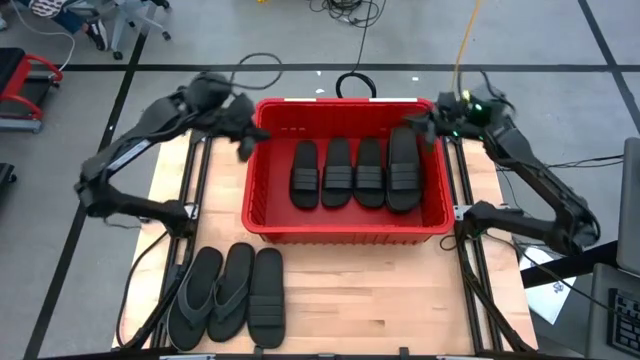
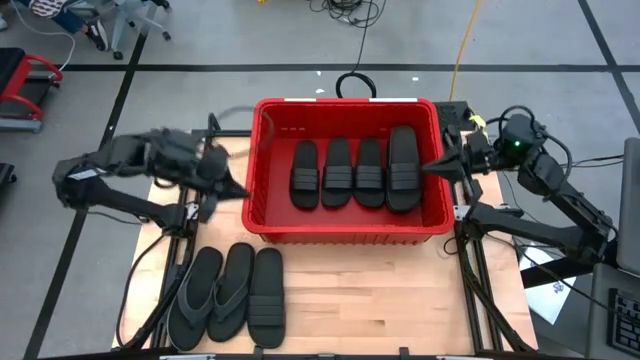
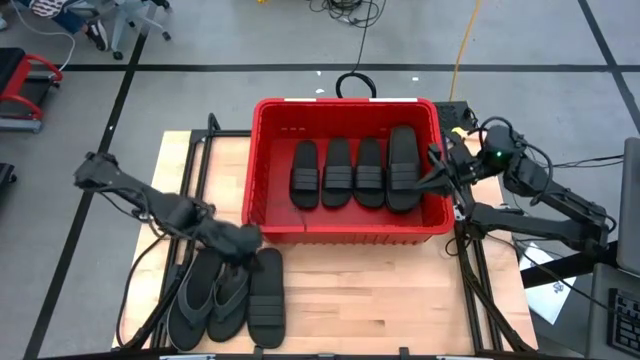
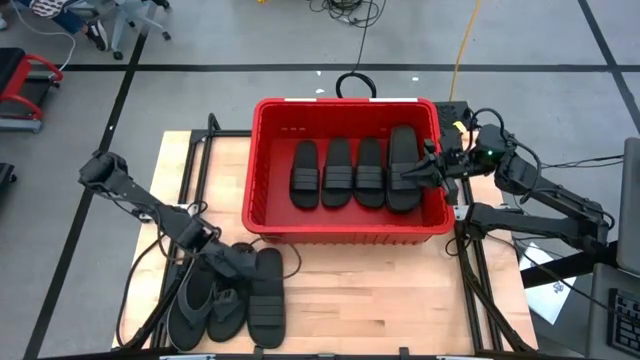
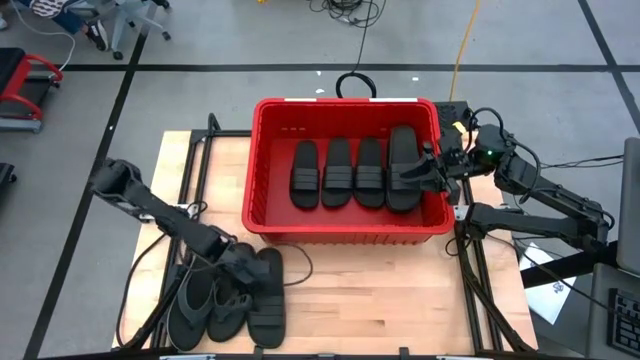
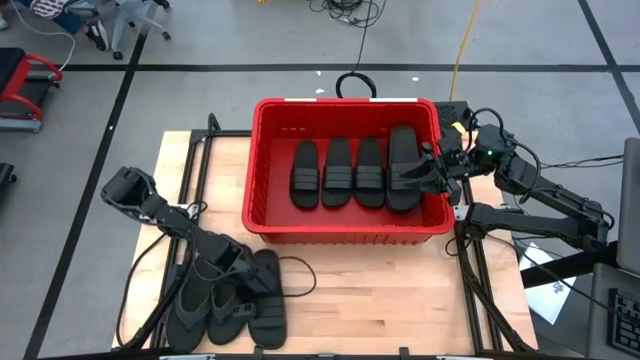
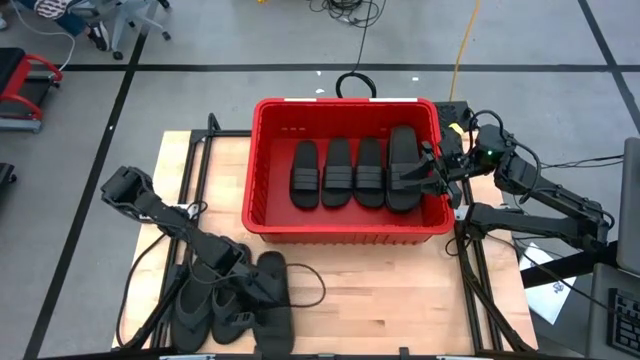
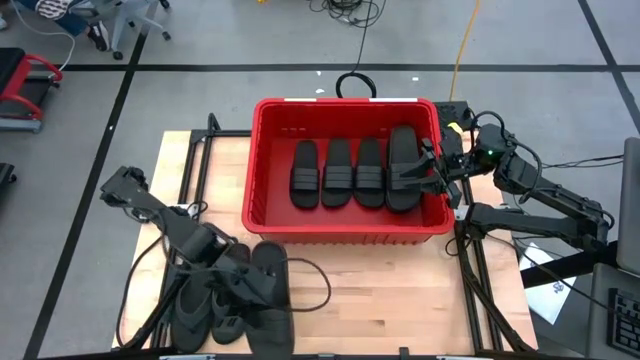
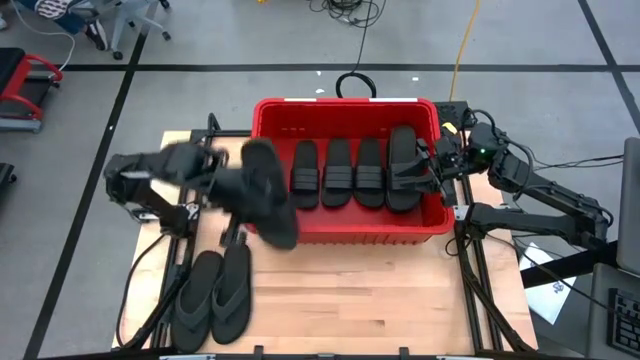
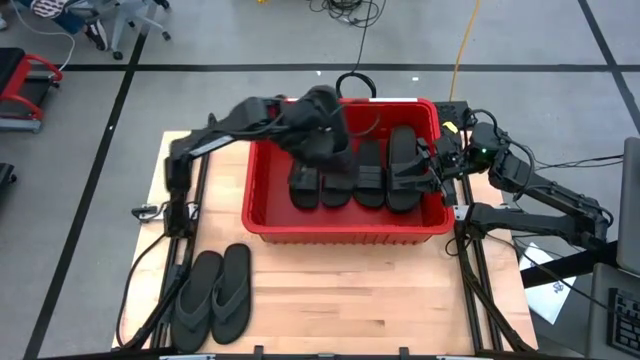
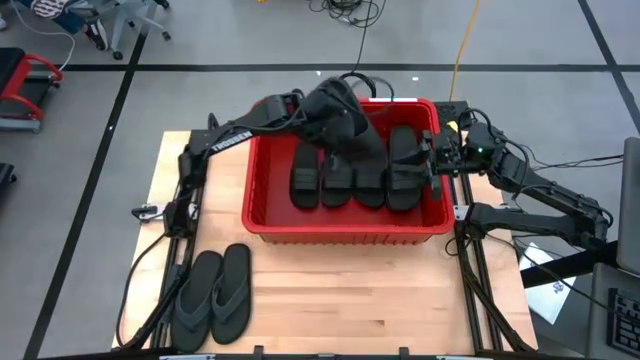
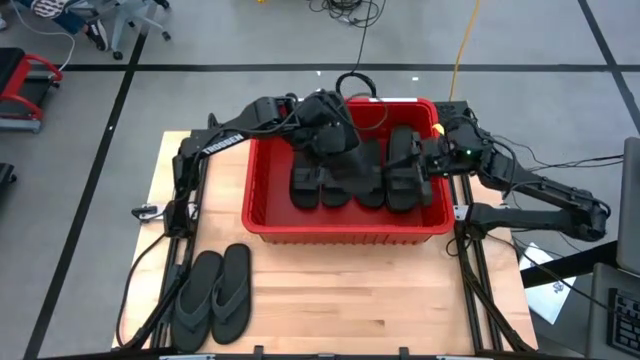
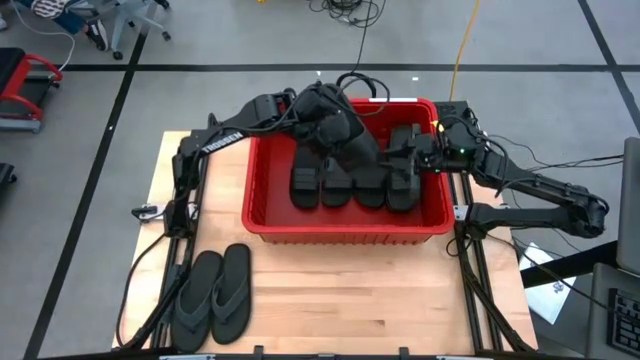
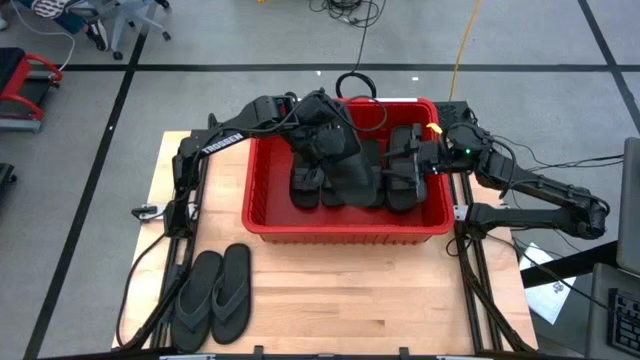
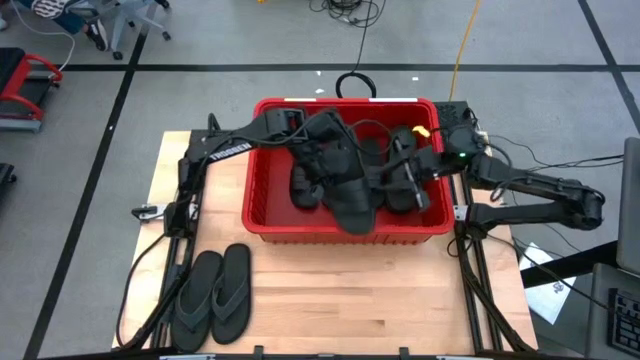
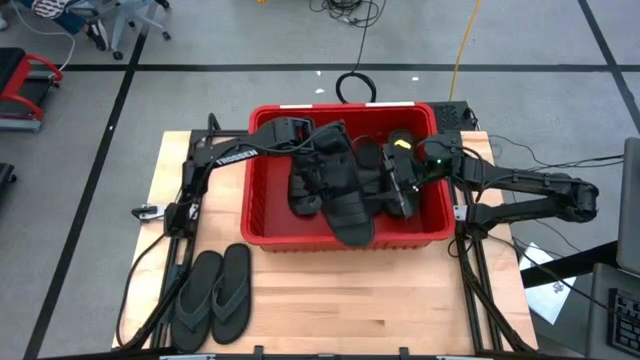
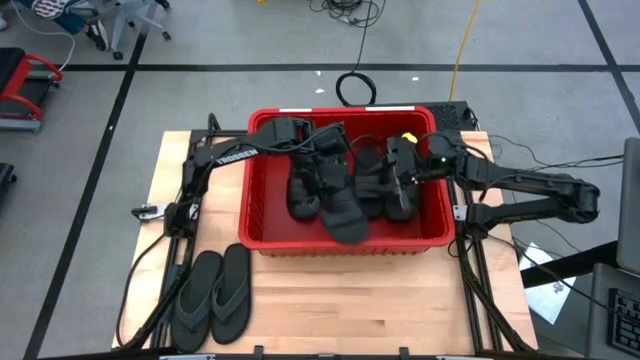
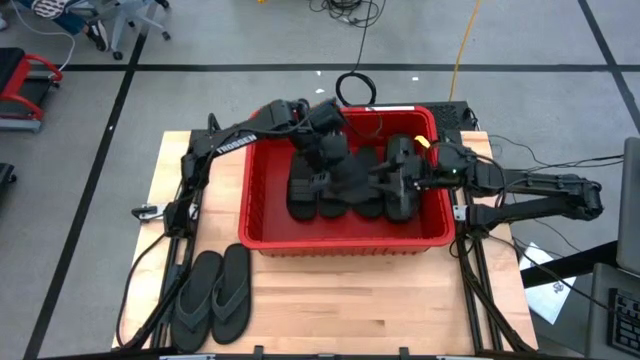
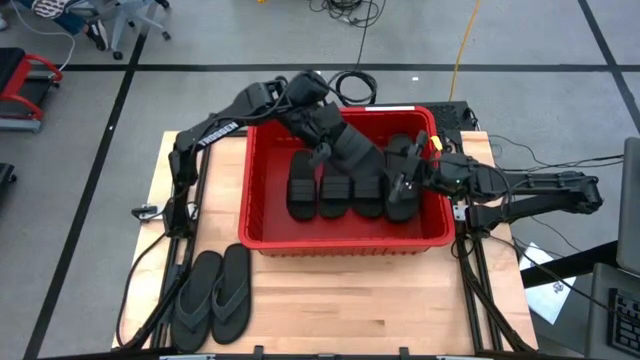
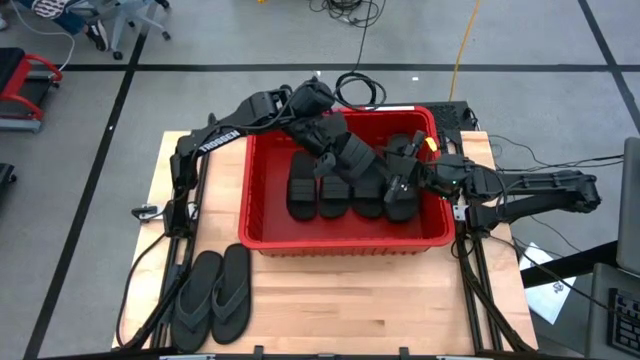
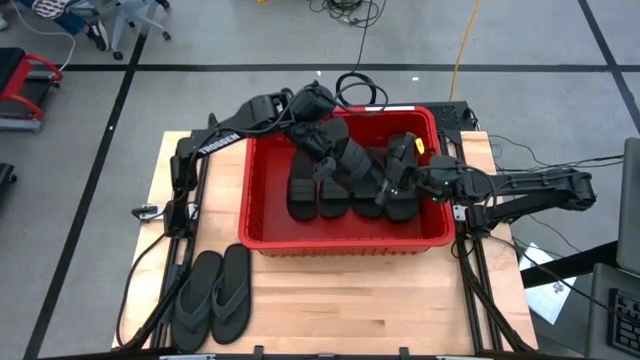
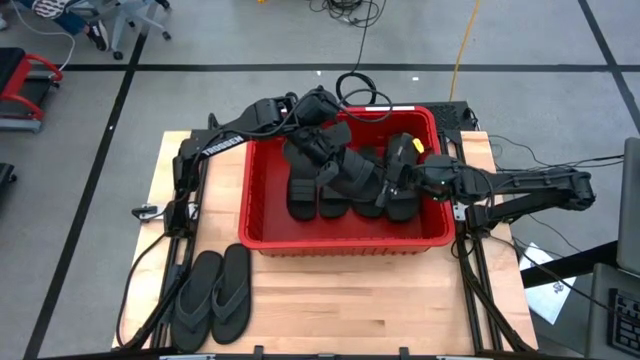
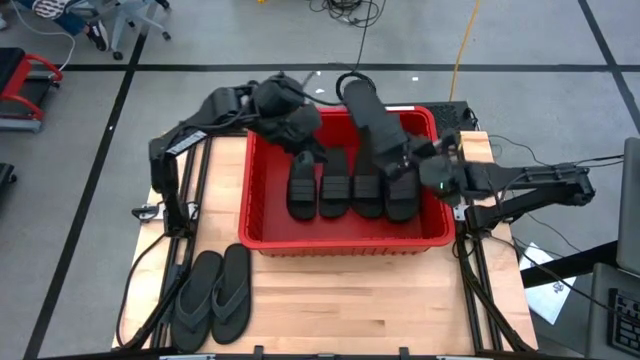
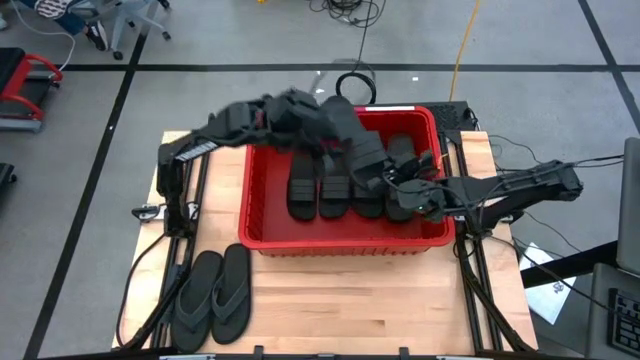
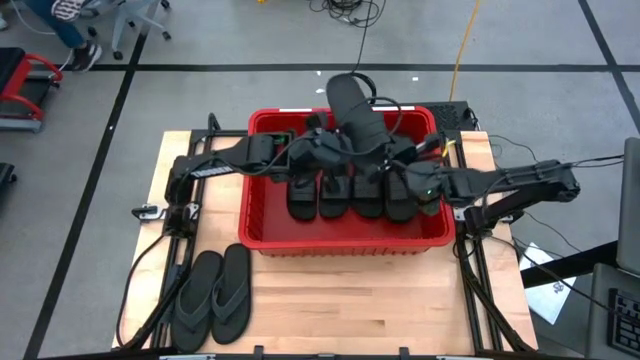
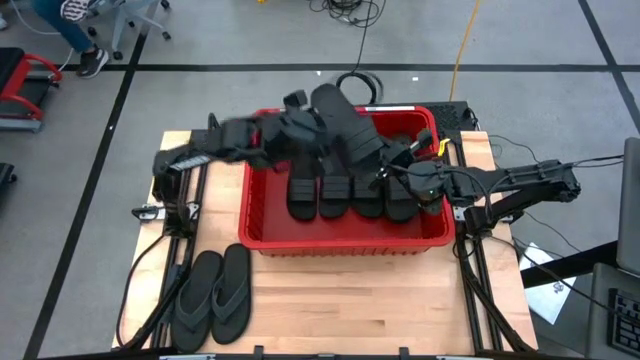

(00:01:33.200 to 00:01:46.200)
Task: Pick and place slides into bin
Put the black slide into the red container

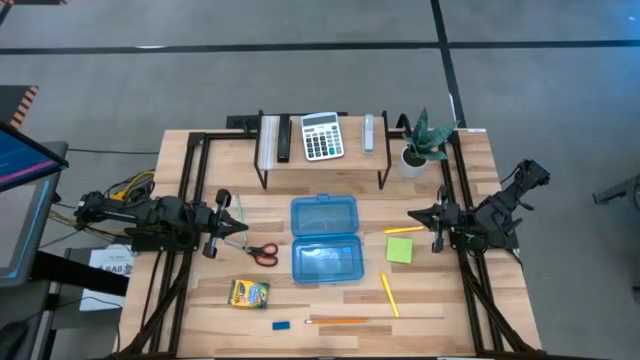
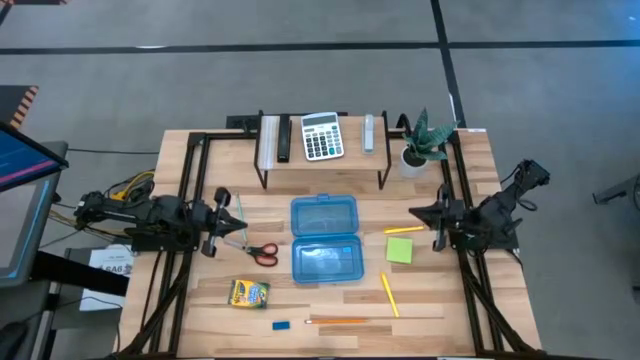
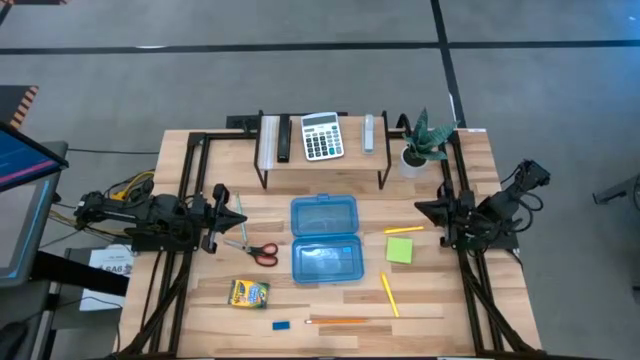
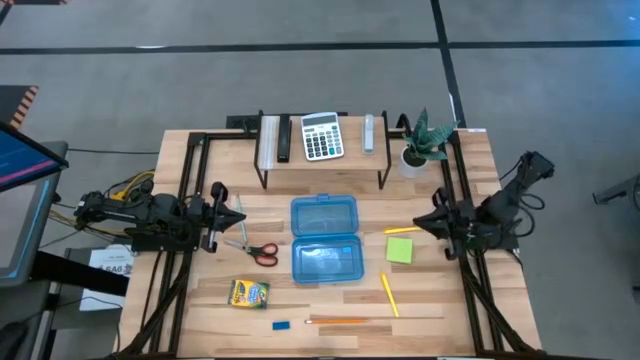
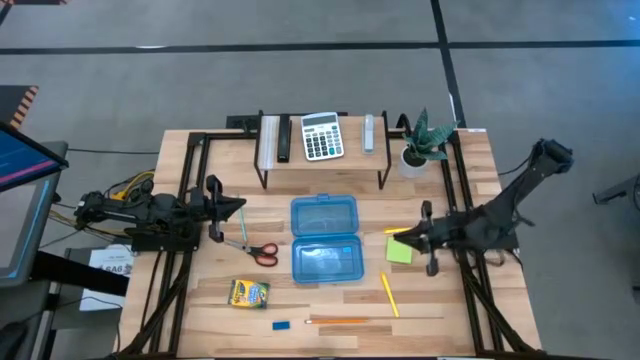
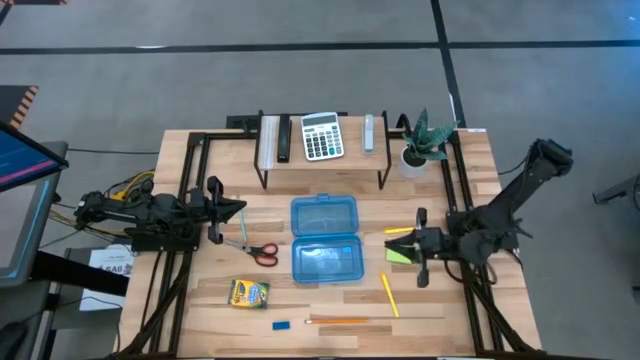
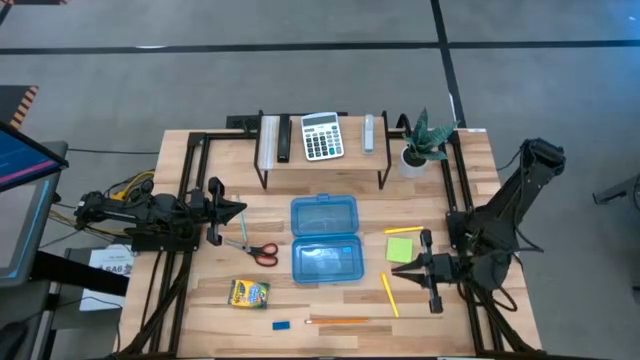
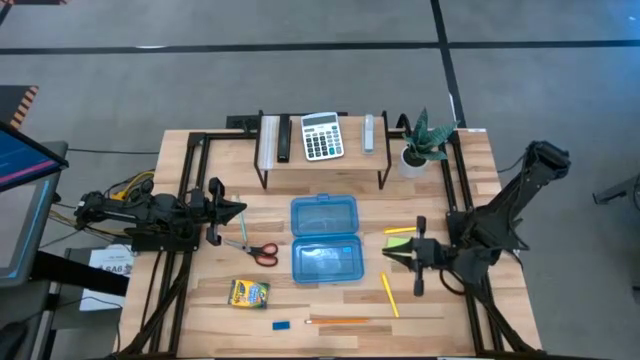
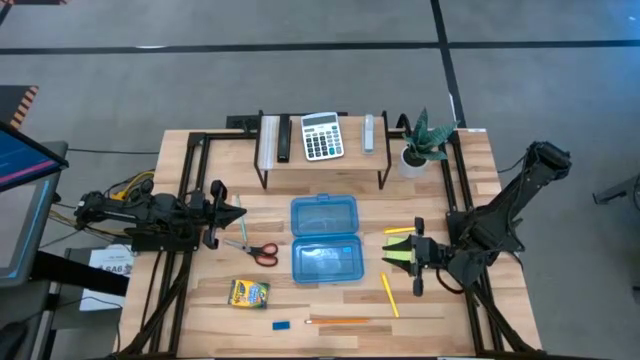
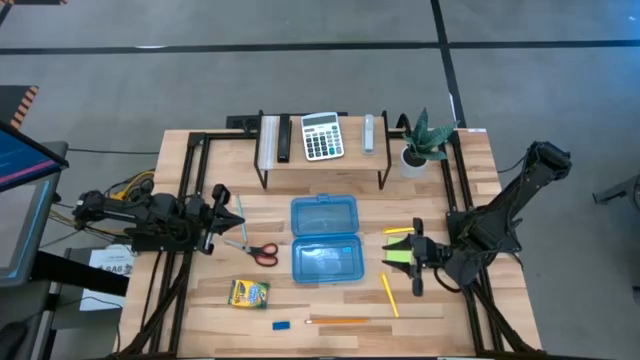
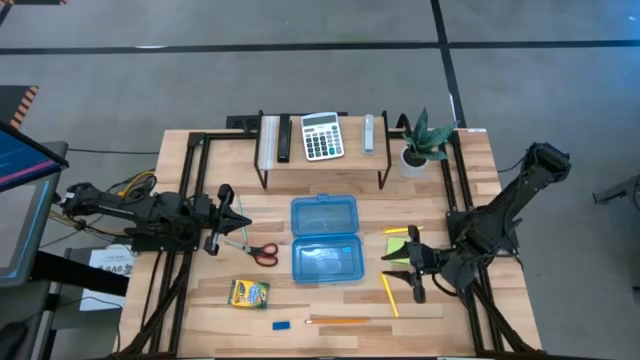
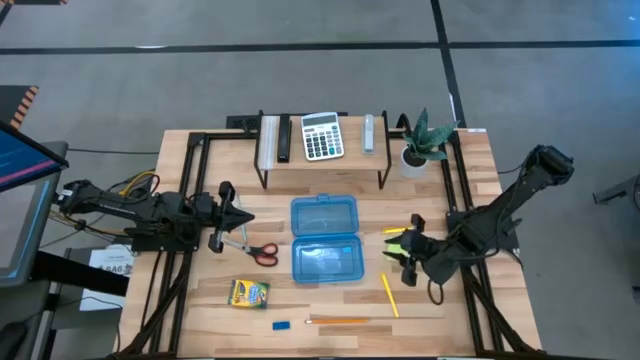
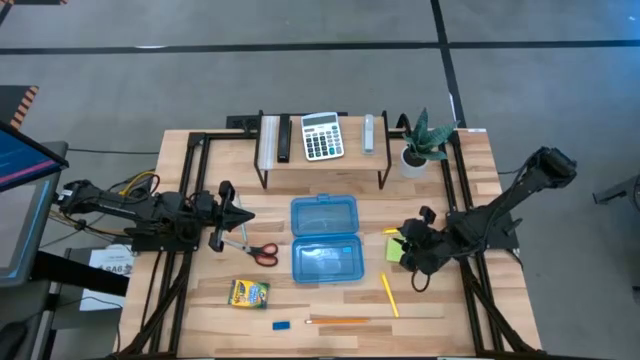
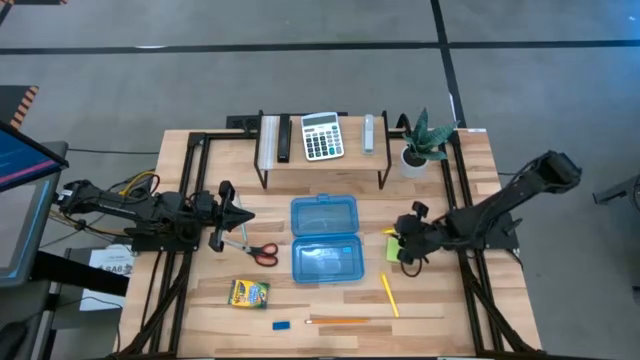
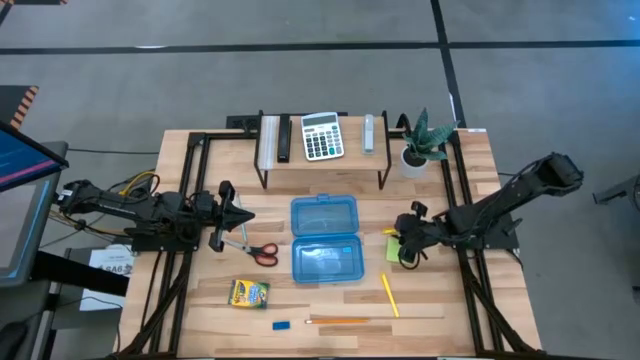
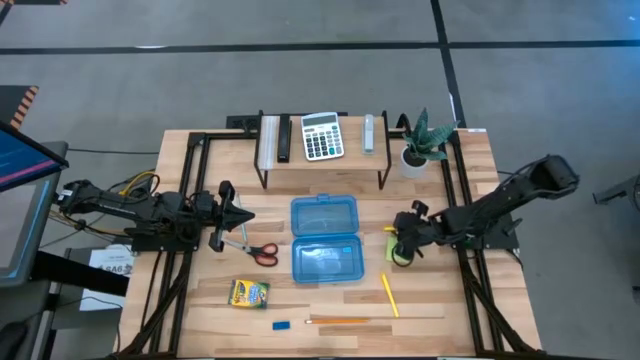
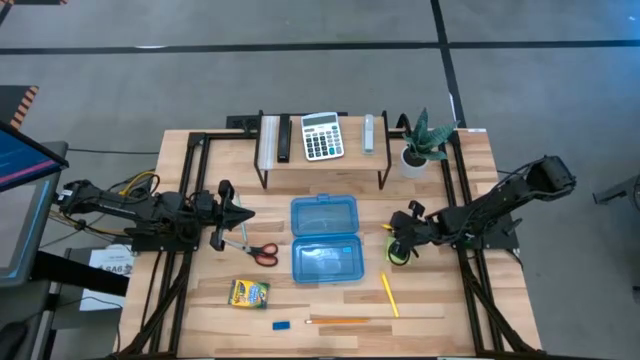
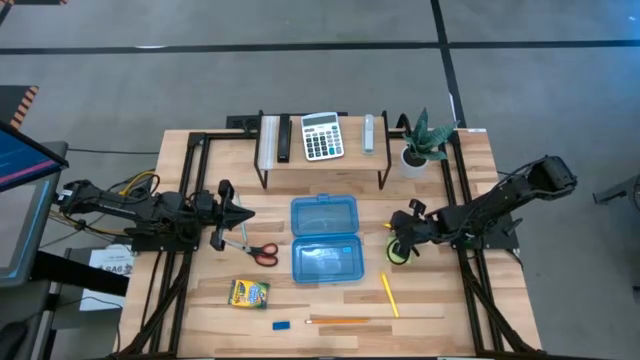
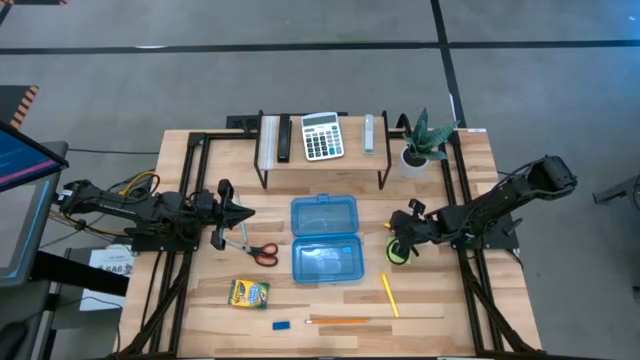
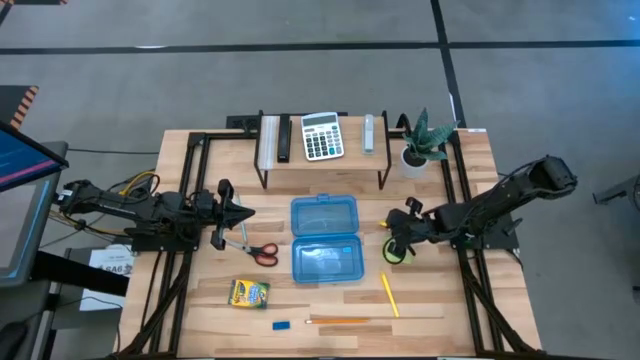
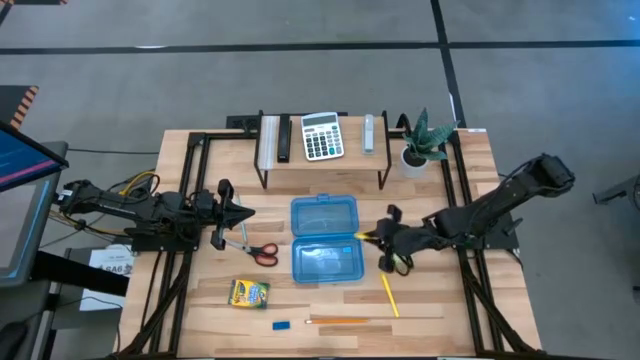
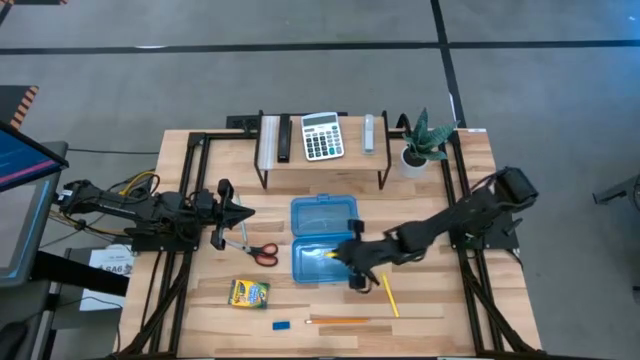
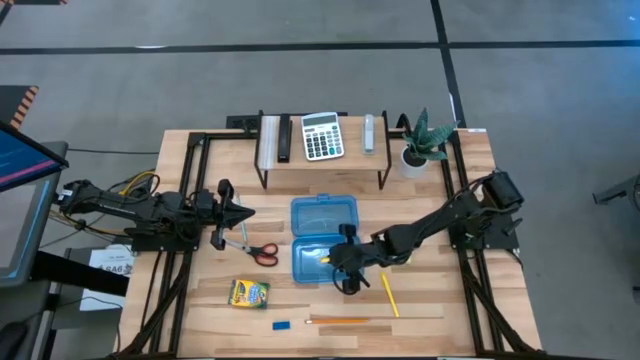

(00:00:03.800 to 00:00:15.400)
Task: Pack school essentials
Put the top yellow ballpoint pen into the blue supply box
